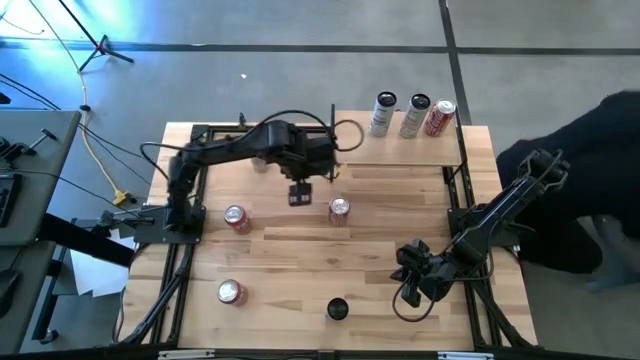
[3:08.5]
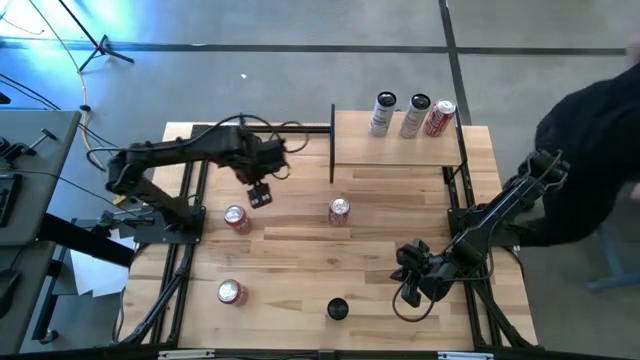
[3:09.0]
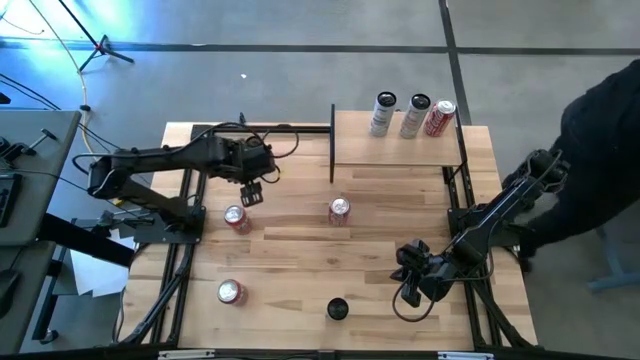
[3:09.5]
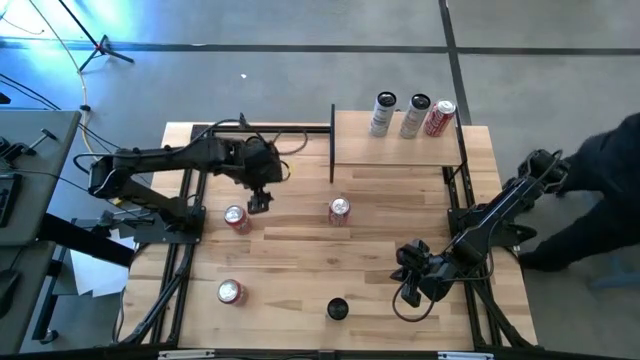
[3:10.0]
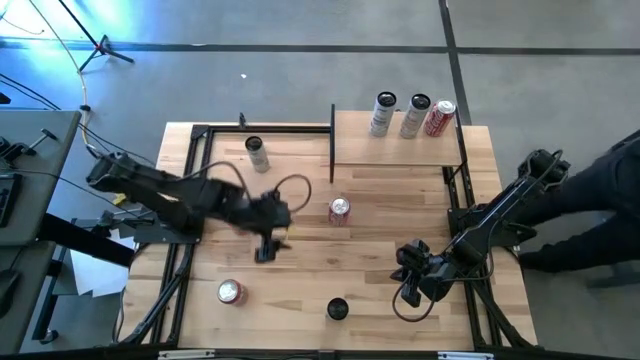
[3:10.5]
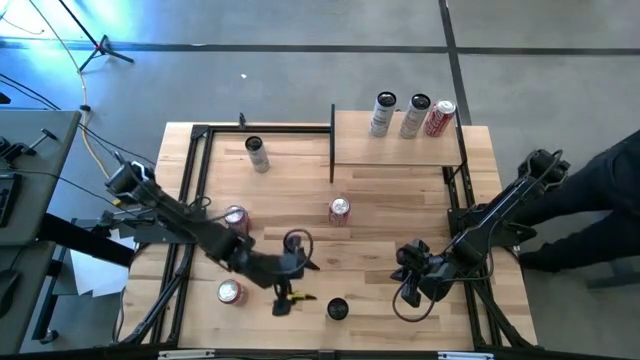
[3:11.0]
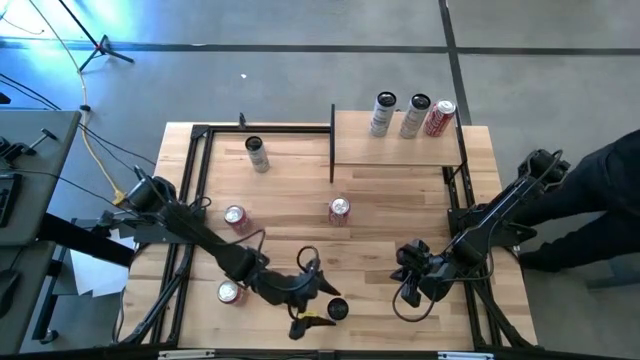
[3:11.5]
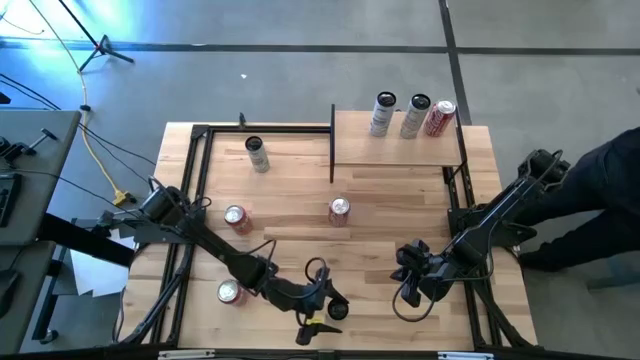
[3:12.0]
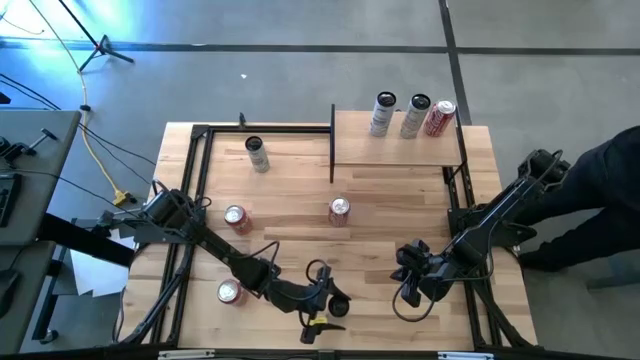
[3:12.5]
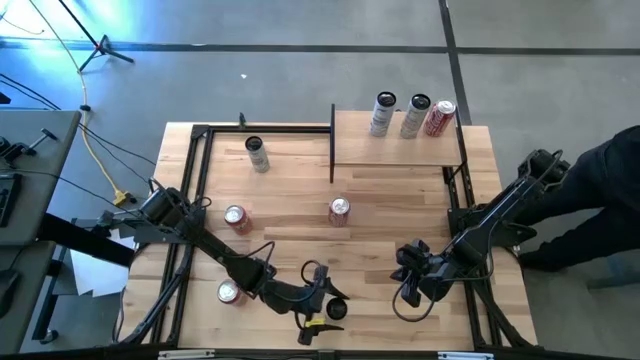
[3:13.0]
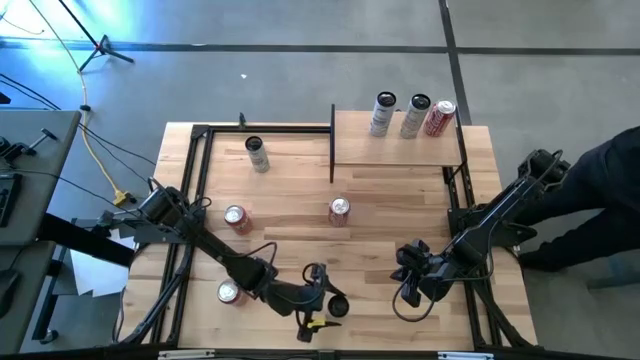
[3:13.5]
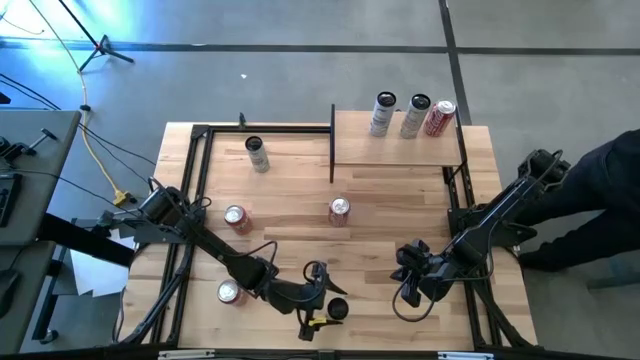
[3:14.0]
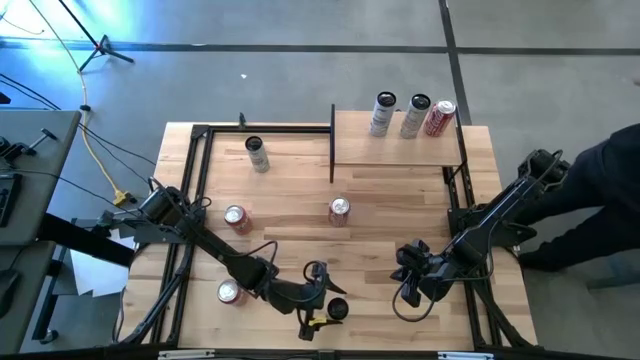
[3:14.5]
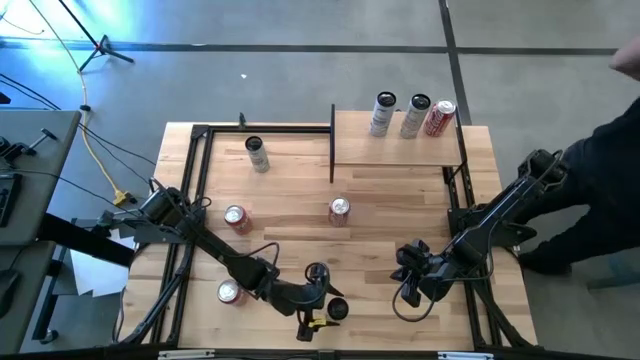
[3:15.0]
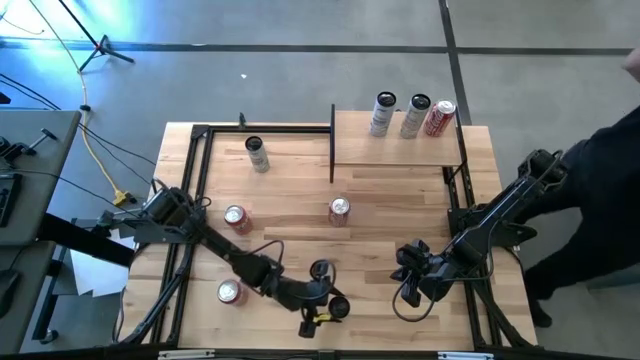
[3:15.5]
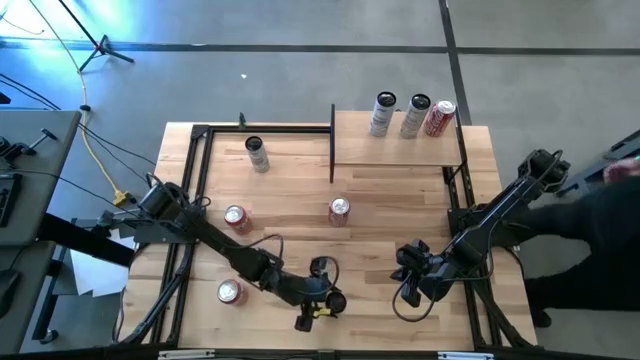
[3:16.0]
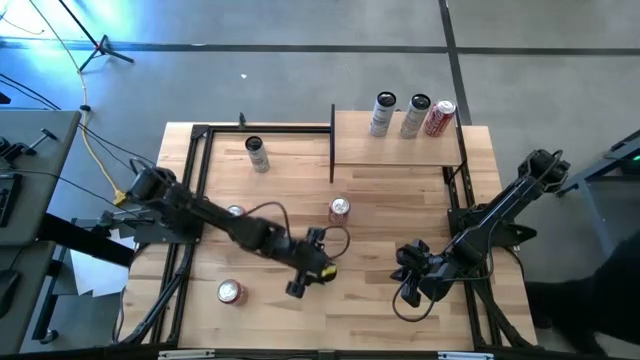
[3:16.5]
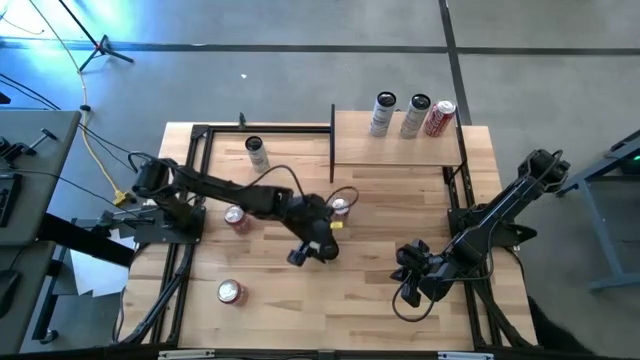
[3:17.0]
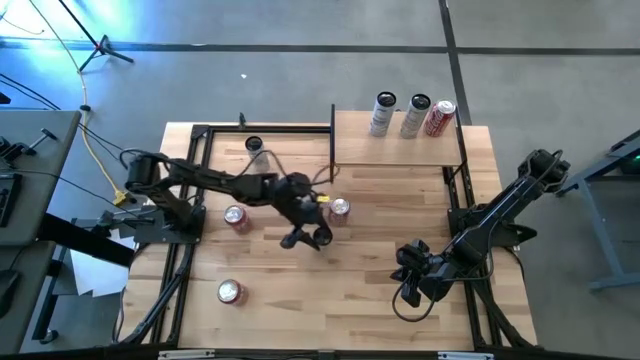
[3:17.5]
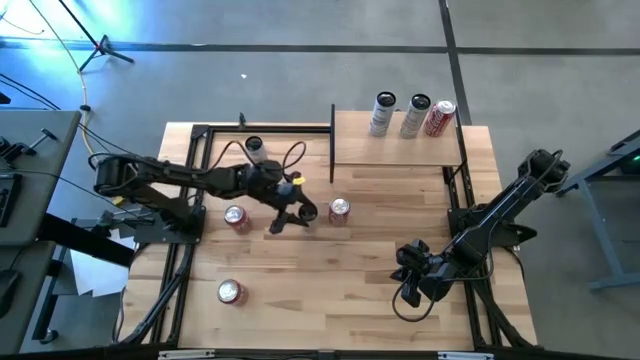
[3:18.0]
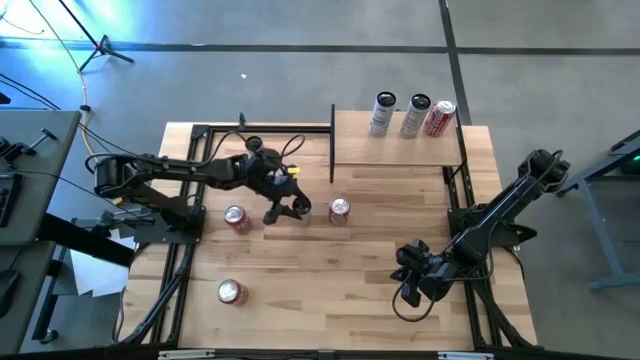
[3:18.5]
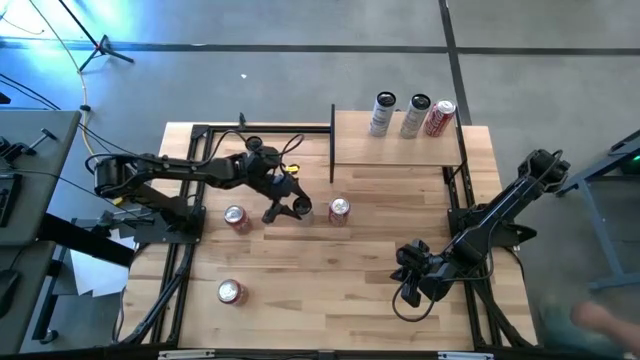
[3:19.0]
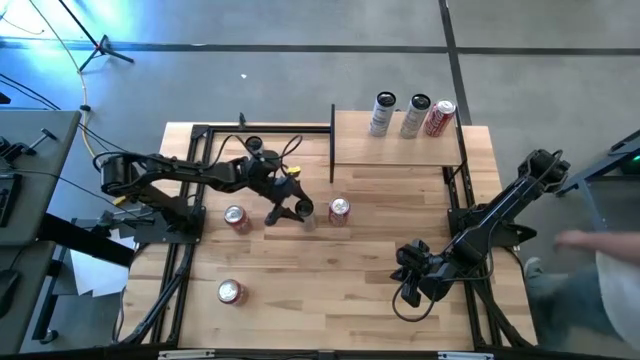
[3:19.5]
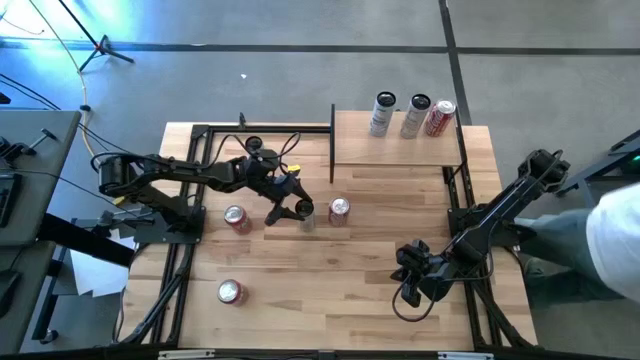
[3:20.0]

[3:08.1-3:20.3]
Task: Place canned beverage on shelf
Move the white soda can to the center of the table

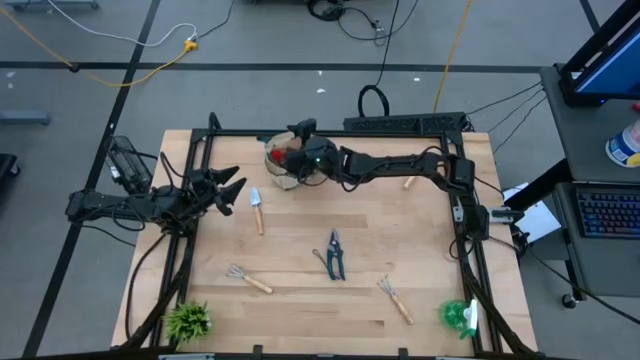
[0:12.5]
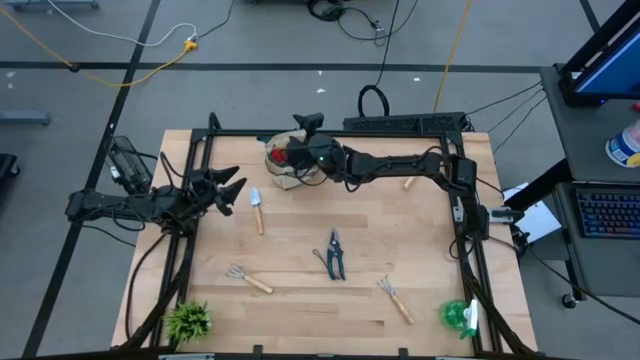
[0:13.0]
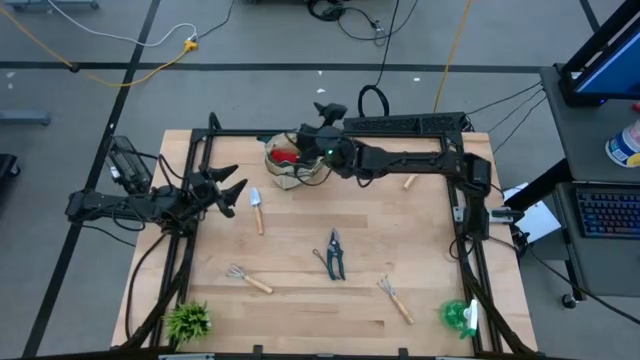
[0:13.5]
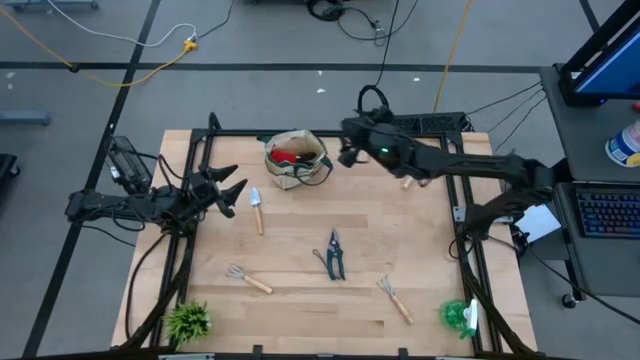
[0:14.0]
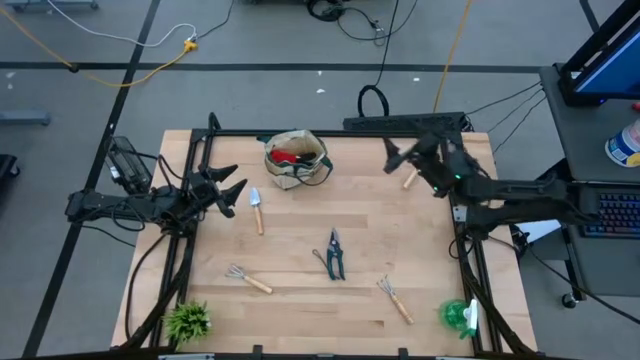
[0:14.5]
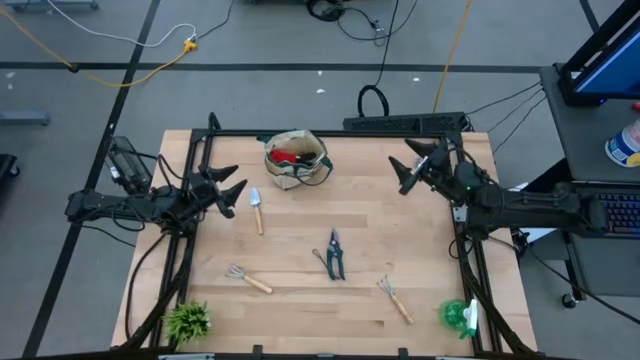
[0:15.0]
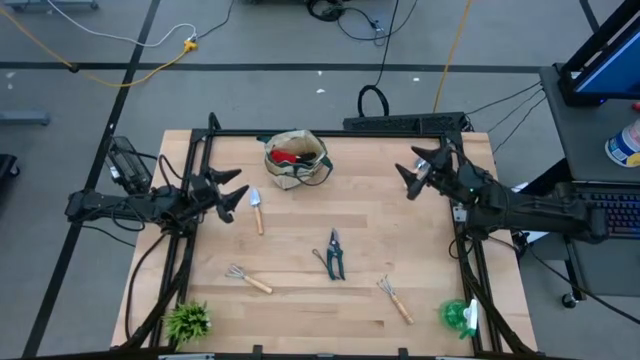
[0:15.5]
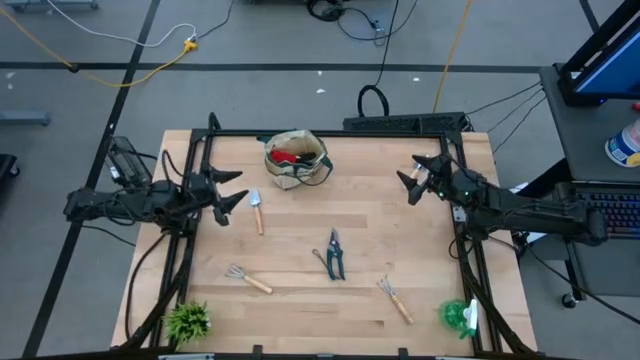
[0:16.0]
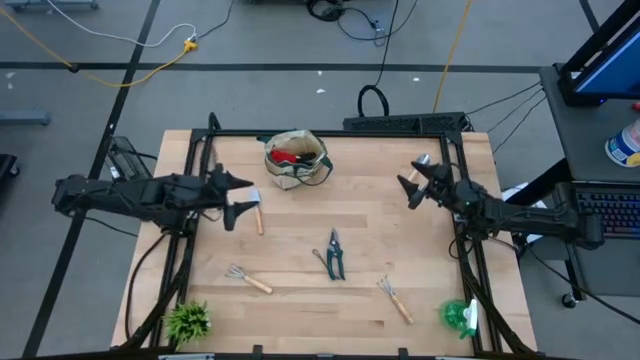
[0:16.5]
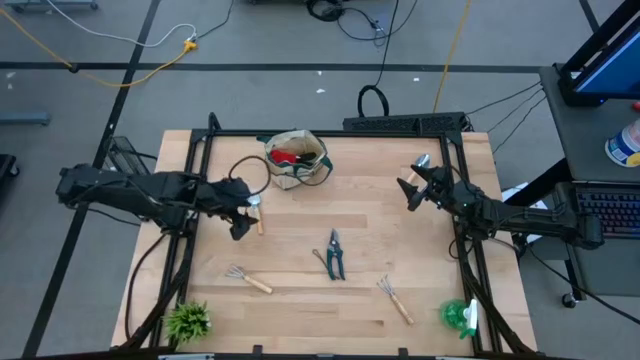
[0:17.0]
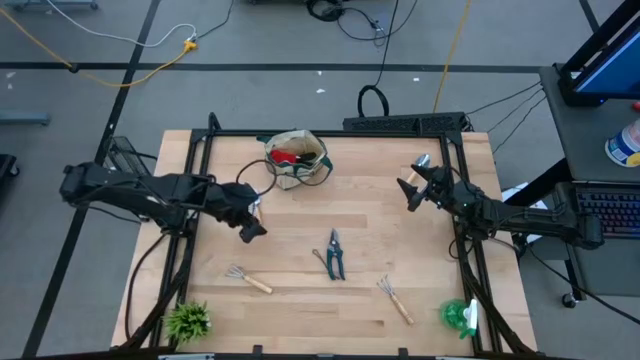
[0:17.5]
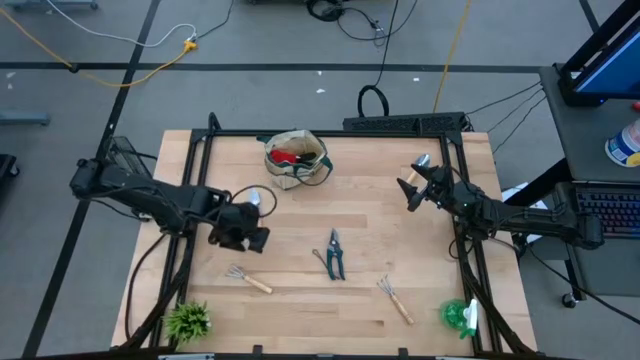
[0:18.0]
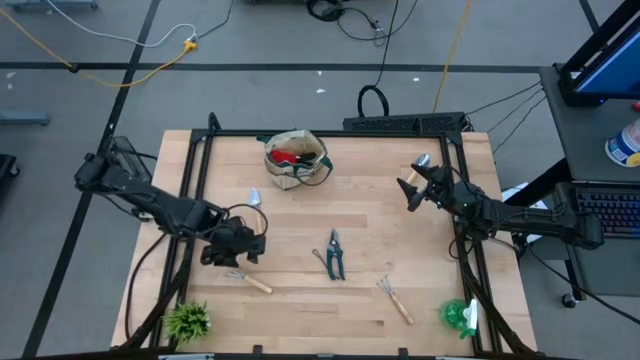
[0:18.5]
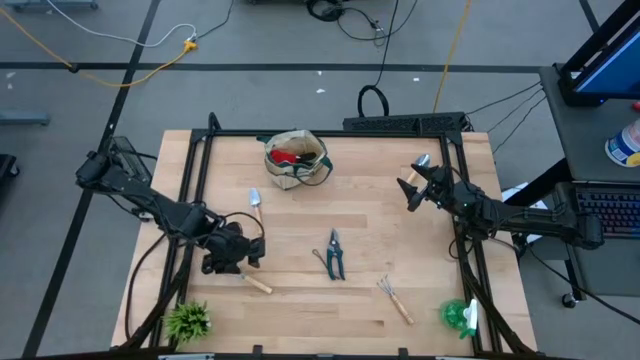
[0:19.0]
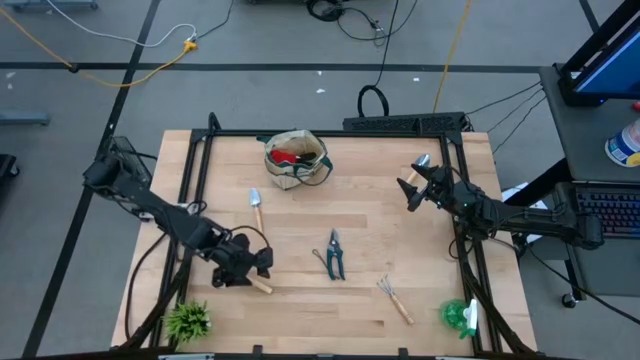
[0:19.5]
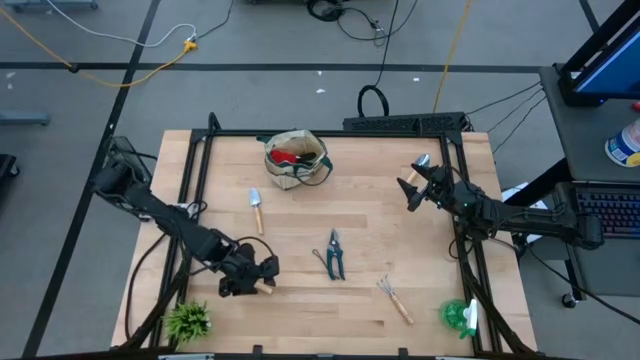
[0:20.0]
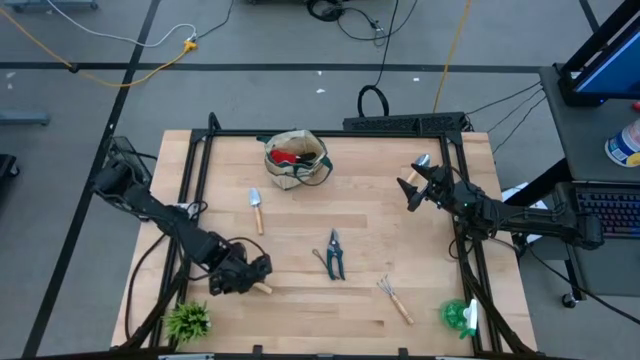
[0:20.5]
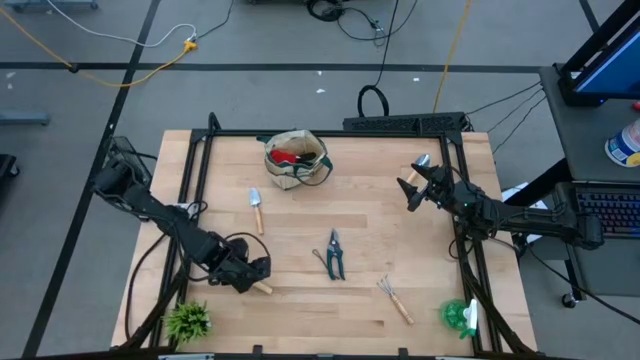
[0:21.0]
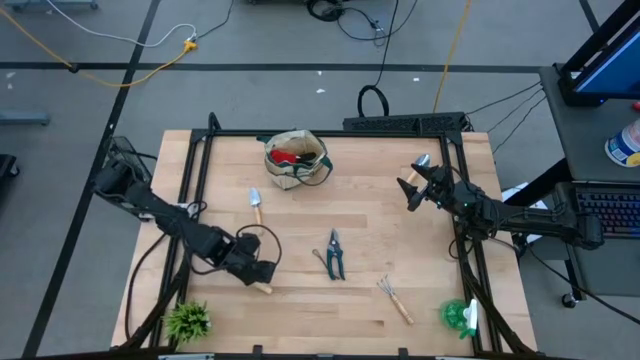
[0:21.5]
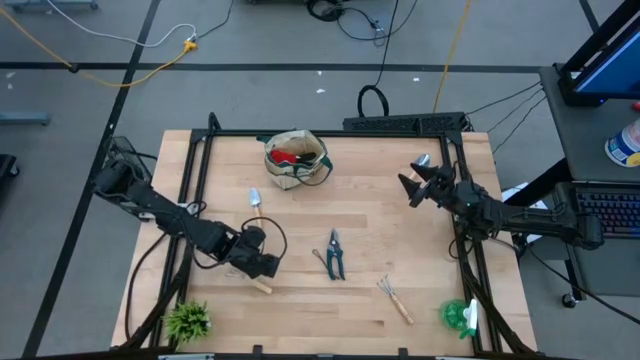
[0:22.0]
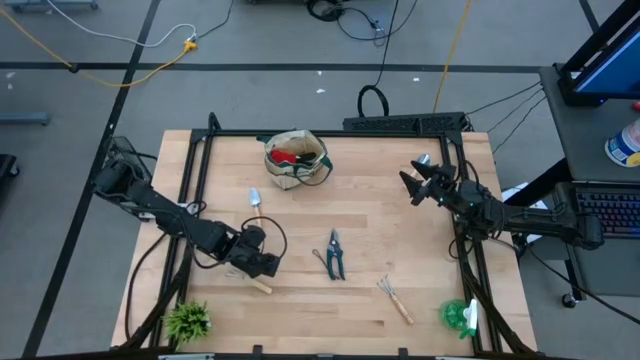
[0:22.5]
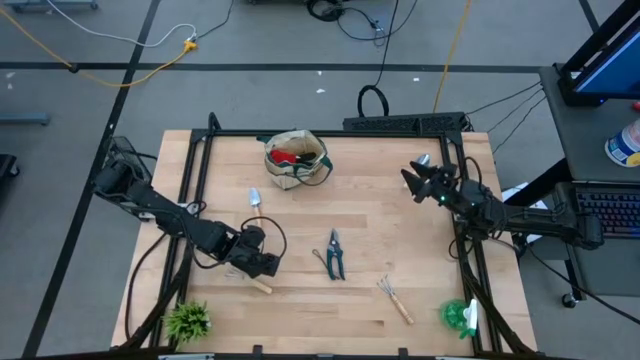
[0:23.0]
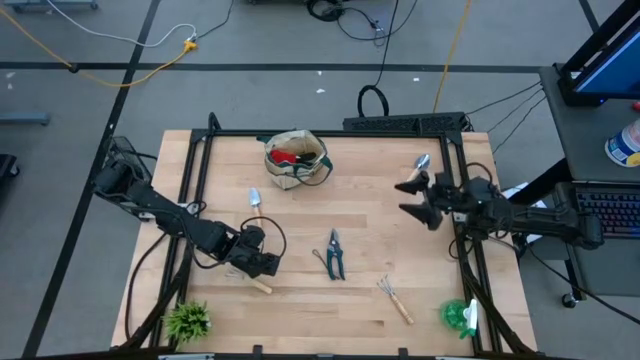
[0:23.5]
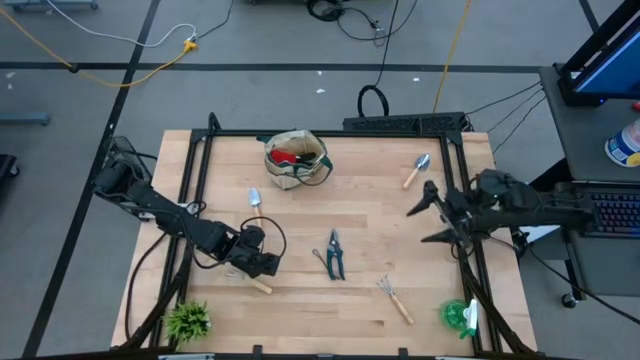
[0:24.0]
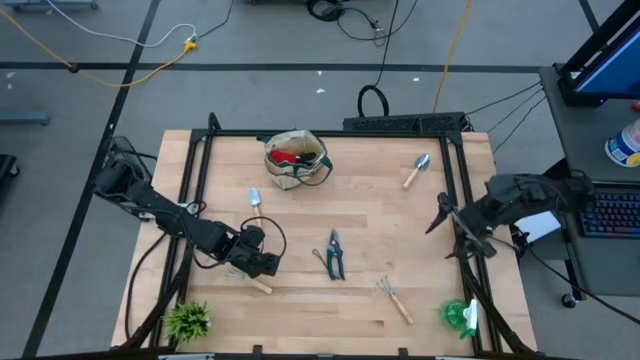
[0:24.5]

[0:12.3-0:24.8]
Task: Pick & Place Garden tools in Gardening bag
Put the spray bottle into the gardening bag
